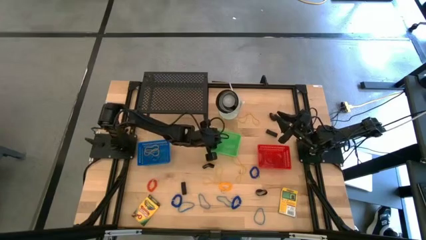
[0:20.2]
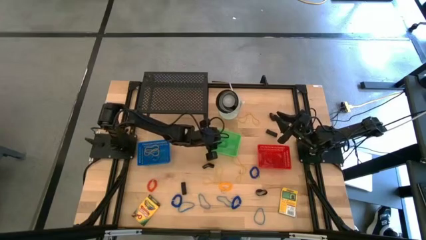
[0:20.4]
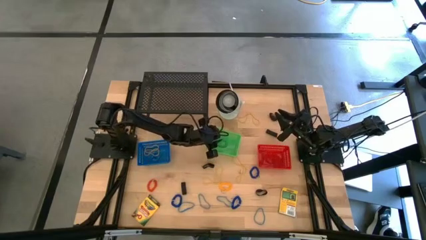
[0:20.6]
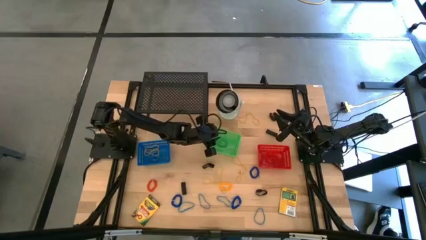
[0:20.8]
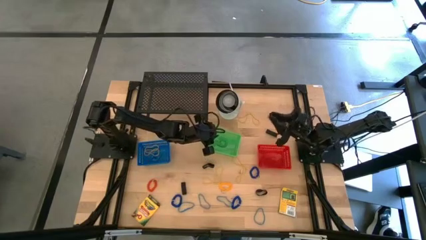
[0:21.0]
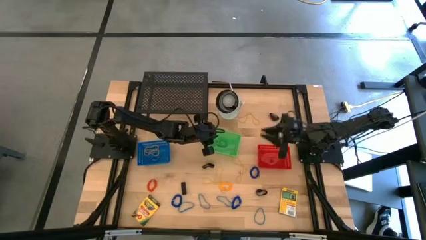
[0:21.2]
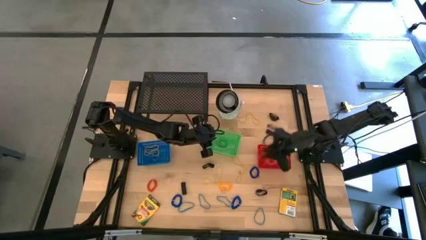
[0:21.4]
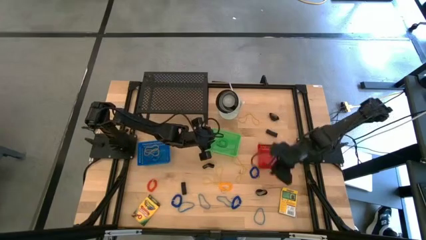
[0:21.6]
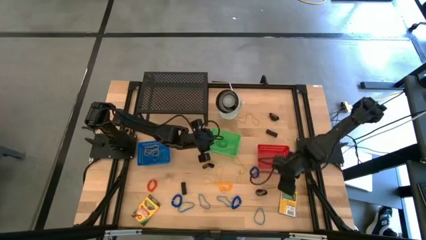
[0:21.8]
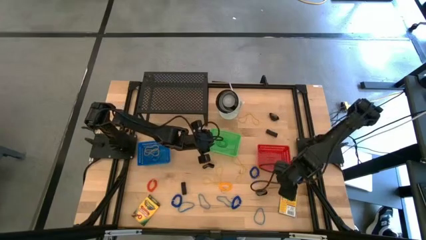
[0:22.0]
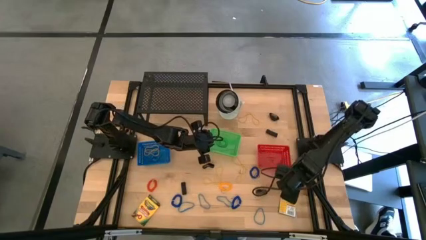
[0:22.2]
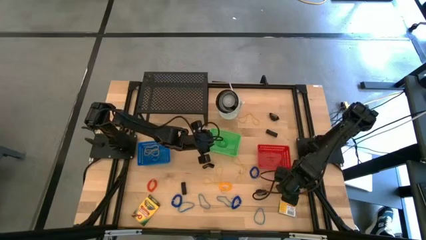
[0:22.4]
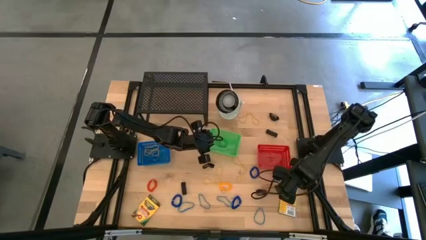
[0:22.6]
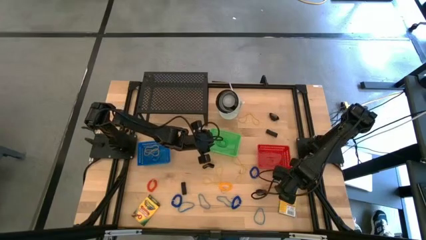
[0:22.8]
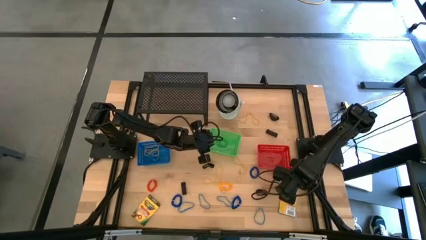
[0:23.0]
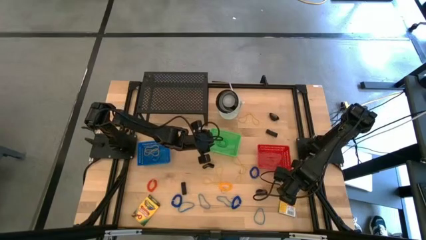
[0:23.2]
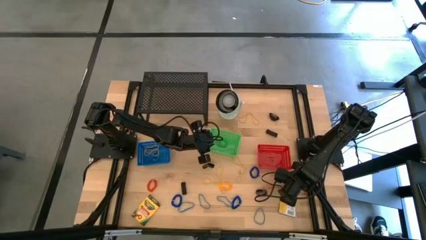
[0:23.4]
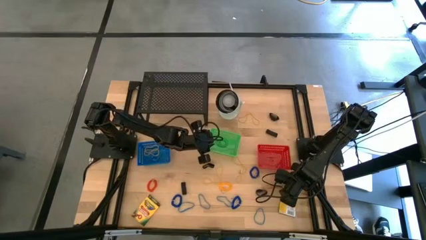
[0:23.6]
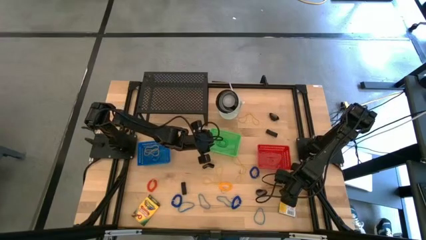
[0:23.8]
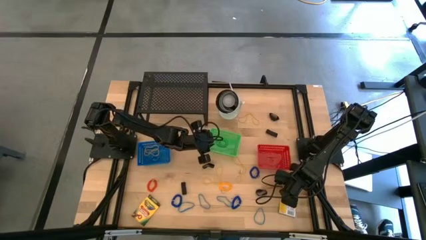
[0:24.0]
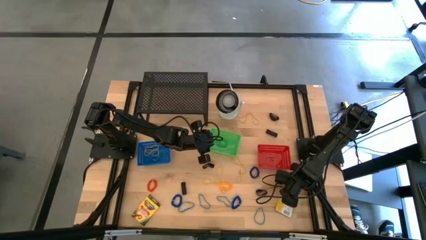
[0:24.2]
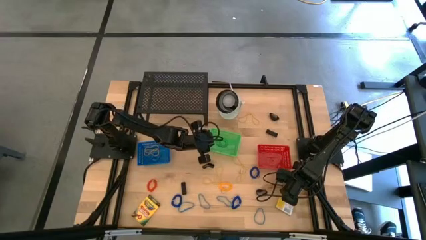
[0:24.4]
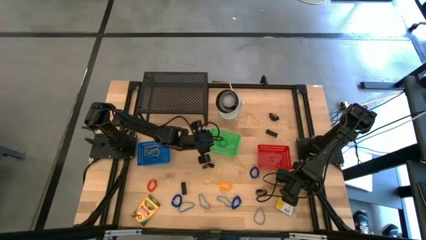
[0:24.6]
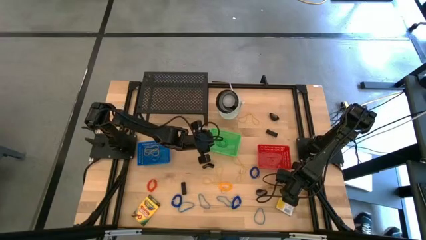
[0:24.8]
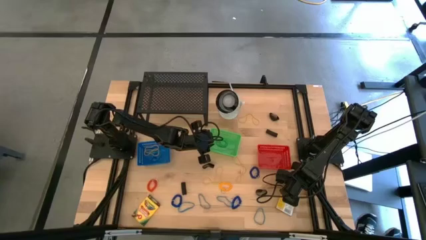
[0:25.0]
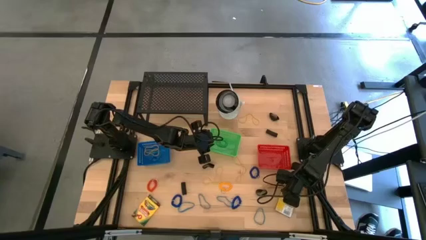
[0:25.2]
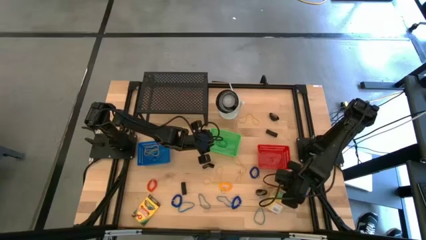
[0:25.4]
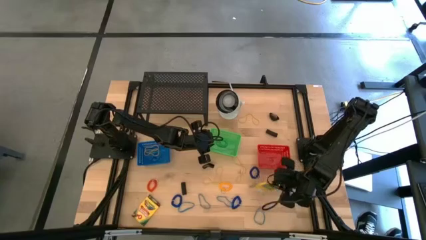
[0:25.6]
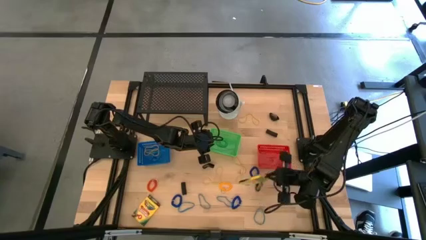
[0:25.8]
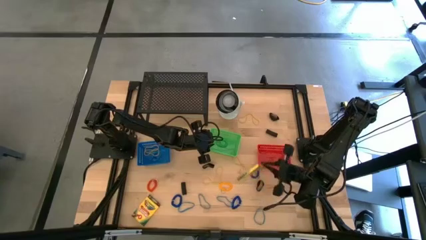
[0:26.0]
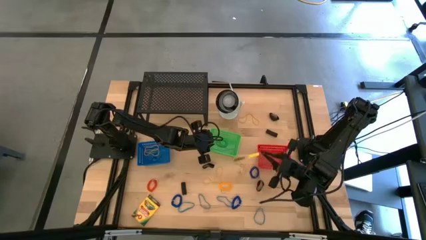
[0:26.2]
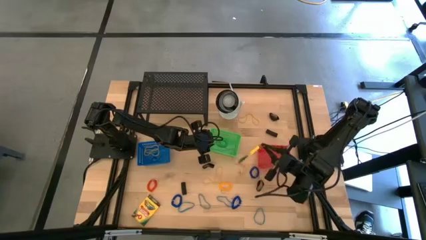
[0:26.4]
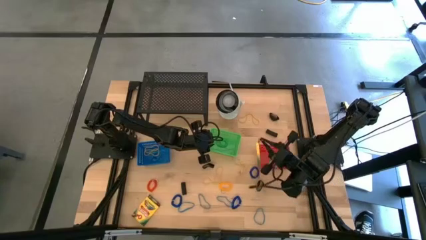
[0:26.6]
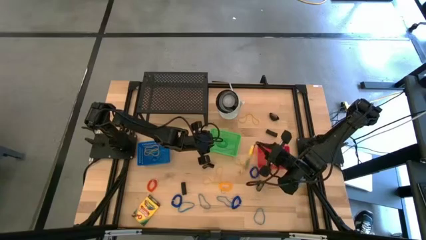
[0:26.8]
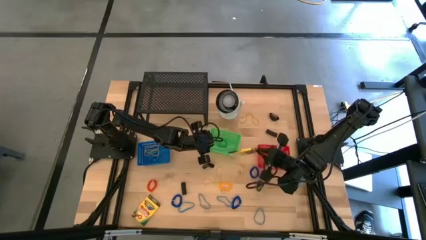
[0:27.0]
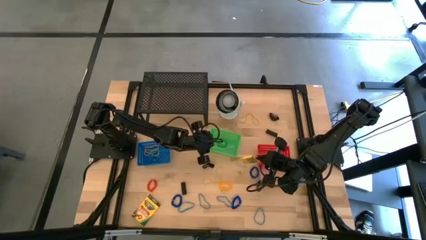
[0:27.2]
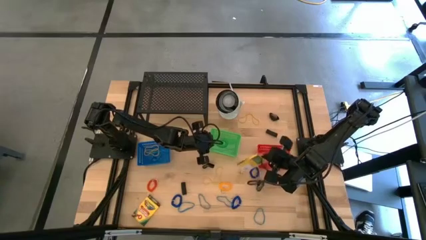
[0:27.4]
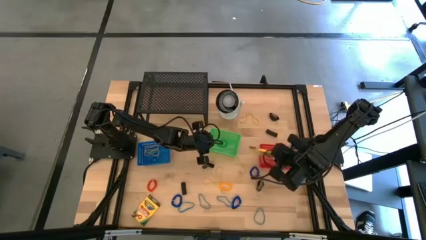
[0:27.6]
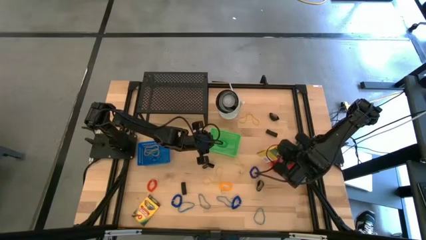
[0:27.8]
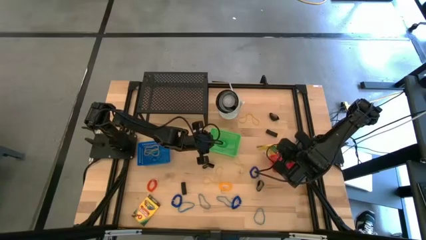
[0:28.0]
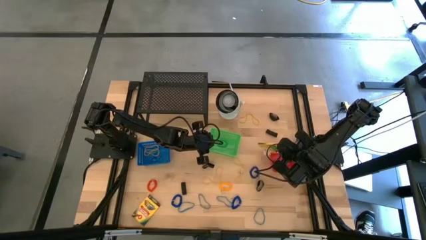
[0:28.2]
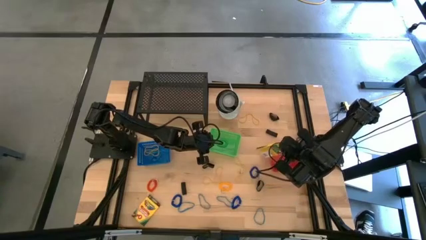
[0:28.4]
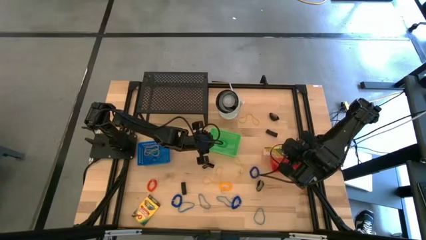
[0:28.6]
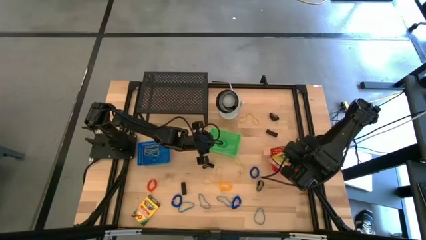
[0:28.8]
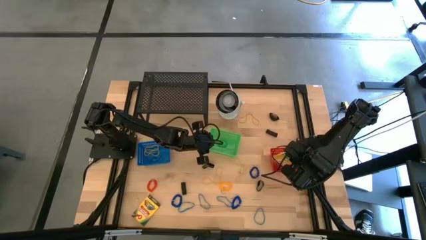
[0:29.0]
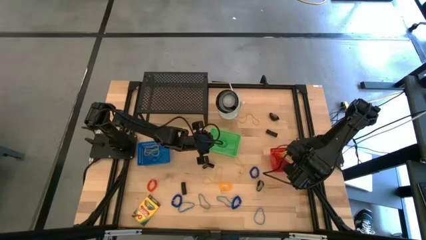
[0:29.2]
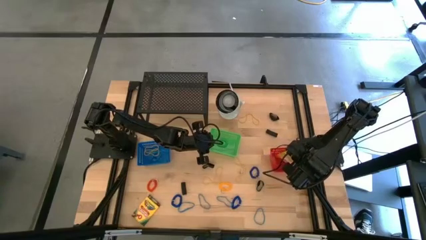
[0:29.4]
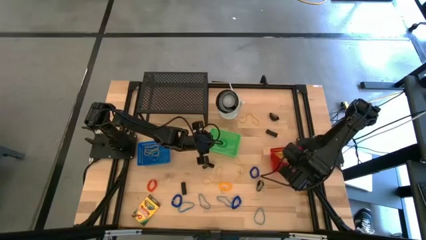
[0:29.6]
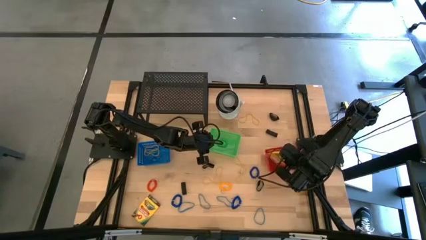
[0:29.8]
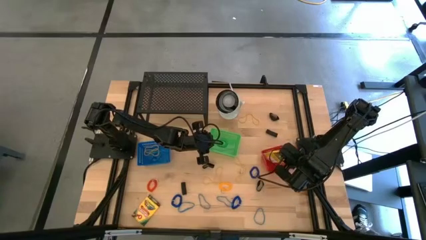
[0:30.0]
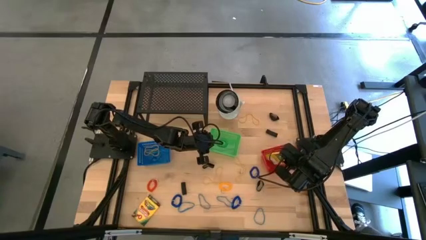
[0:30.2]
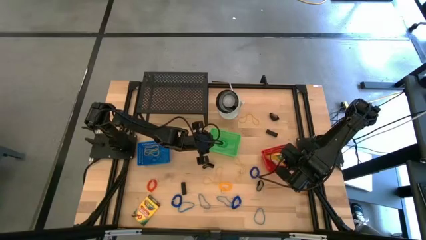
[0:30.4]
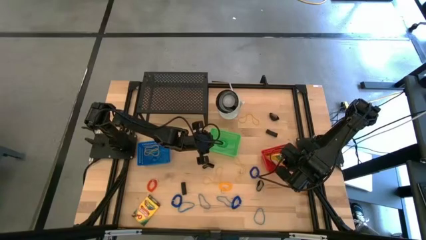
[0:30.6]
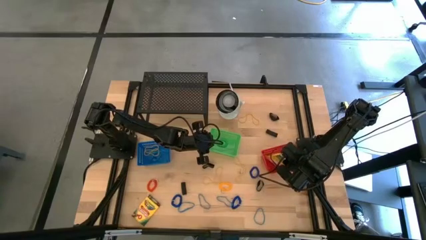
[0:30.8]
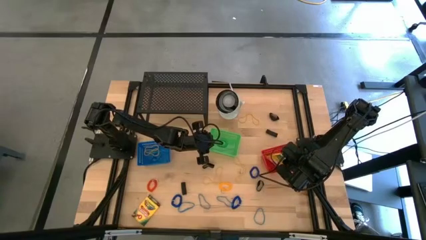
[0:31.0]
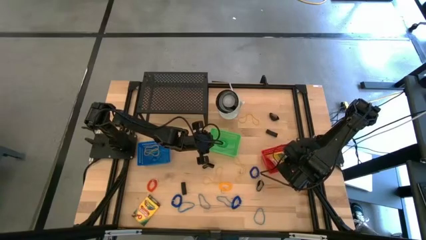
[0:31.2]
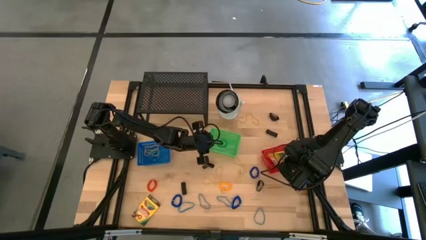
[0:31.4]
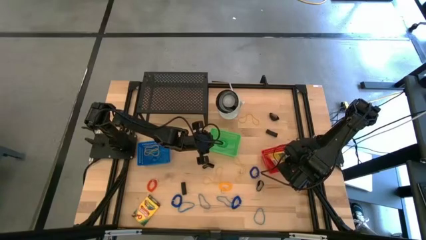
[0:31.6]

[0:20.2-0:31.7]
Task: Pick & Place Office Desk Supplies
Put the crayon box into the red bin
